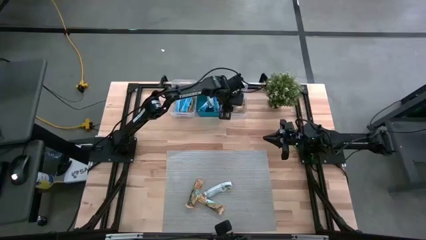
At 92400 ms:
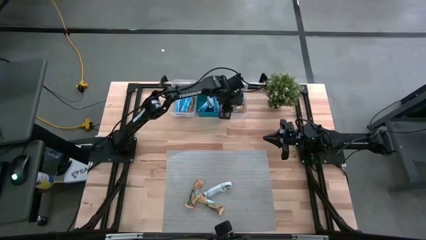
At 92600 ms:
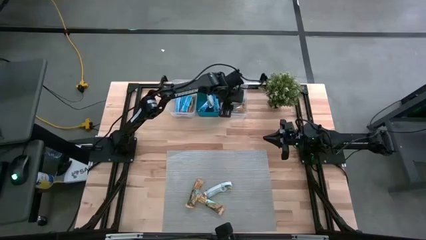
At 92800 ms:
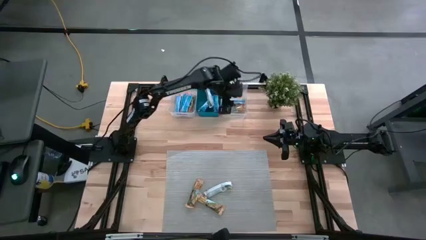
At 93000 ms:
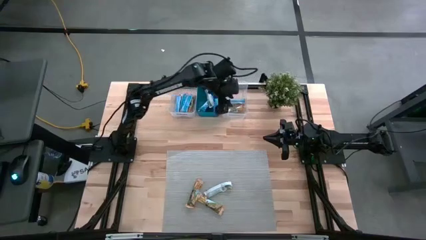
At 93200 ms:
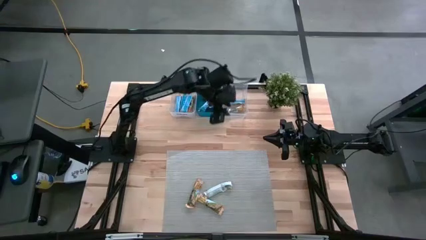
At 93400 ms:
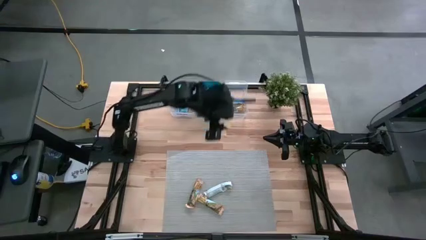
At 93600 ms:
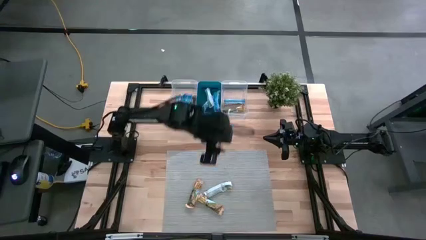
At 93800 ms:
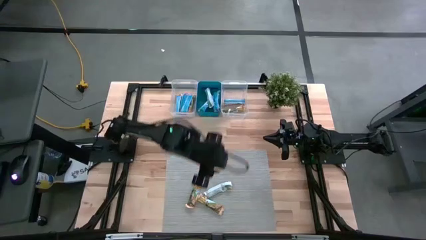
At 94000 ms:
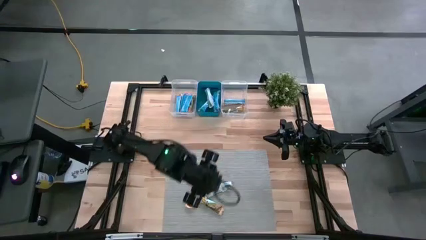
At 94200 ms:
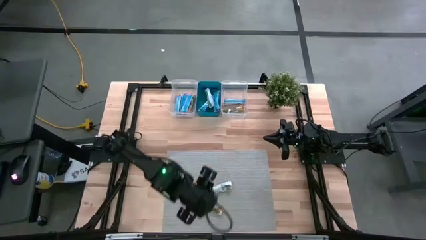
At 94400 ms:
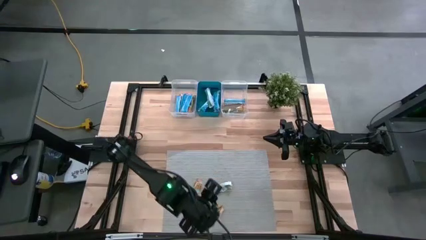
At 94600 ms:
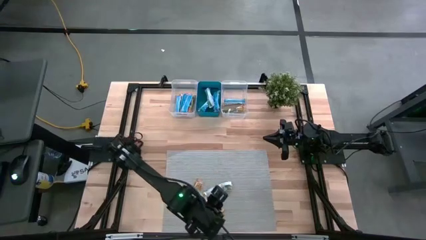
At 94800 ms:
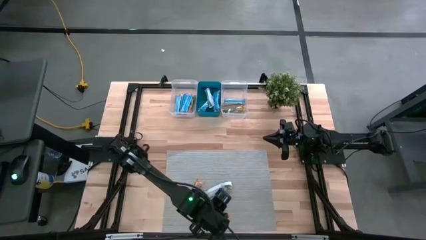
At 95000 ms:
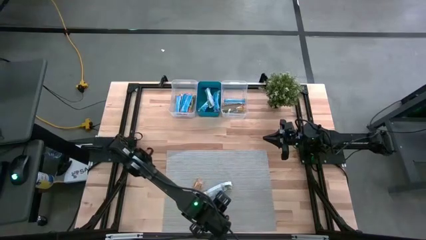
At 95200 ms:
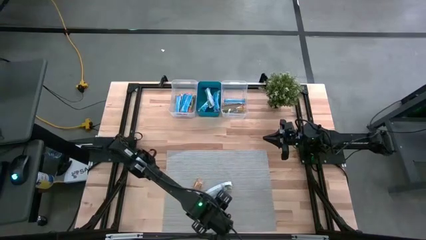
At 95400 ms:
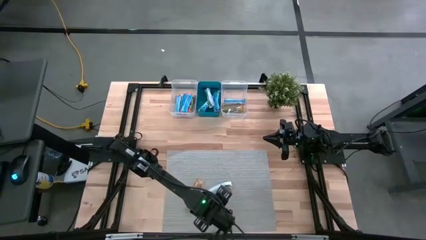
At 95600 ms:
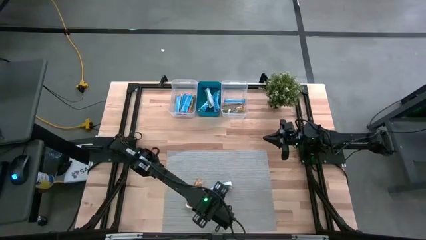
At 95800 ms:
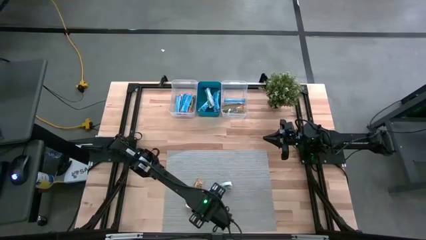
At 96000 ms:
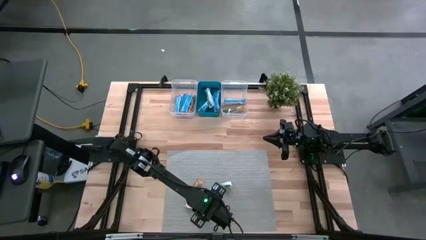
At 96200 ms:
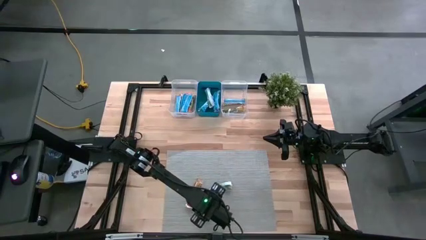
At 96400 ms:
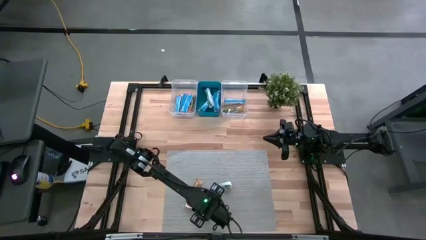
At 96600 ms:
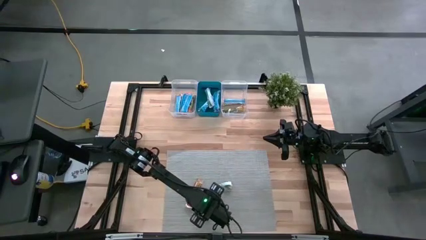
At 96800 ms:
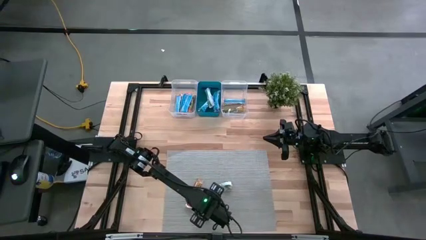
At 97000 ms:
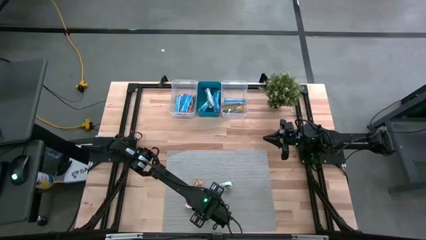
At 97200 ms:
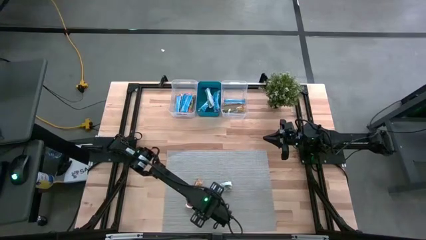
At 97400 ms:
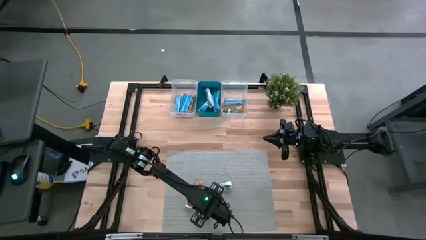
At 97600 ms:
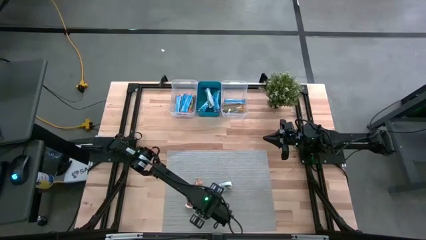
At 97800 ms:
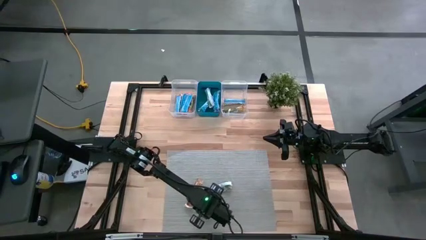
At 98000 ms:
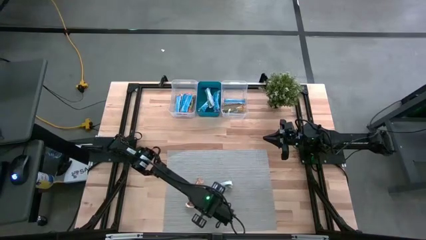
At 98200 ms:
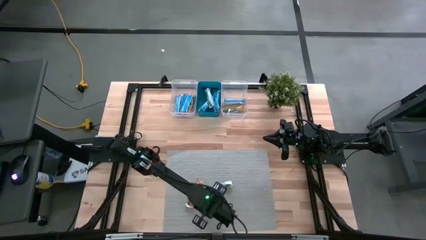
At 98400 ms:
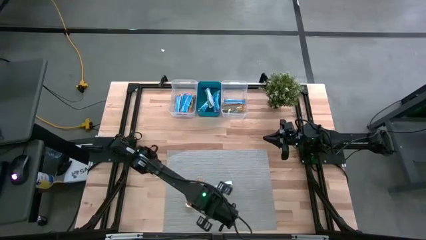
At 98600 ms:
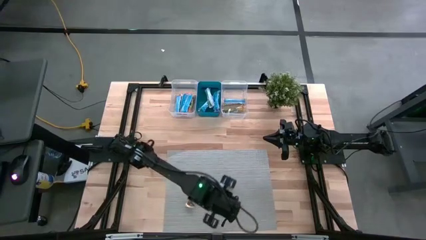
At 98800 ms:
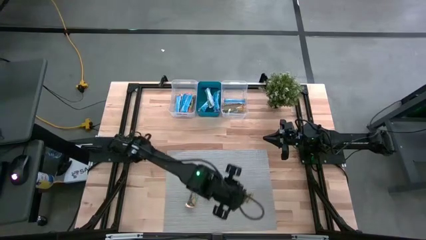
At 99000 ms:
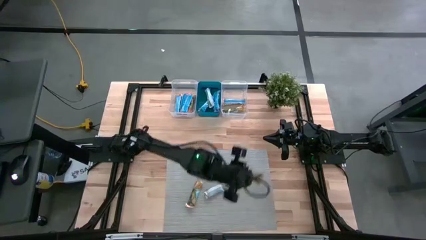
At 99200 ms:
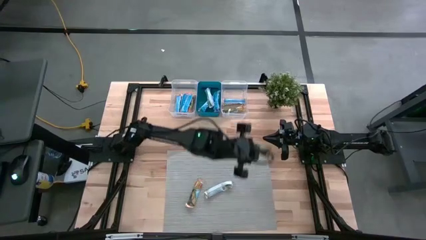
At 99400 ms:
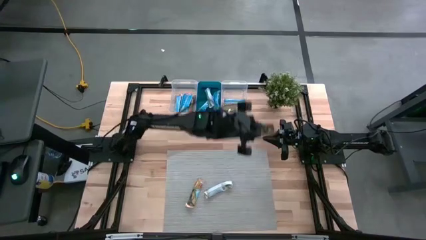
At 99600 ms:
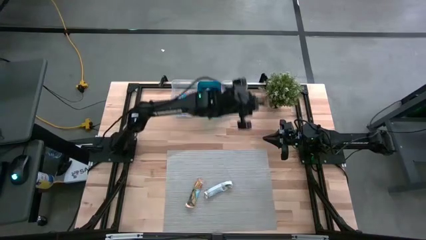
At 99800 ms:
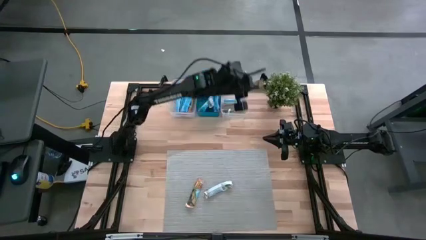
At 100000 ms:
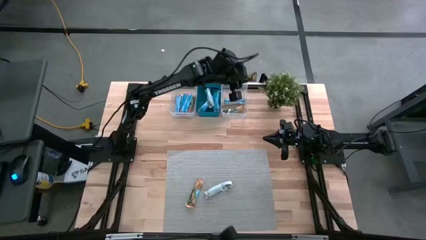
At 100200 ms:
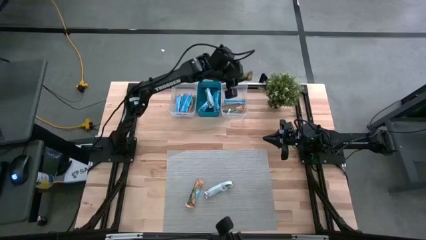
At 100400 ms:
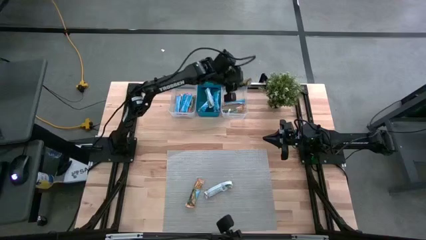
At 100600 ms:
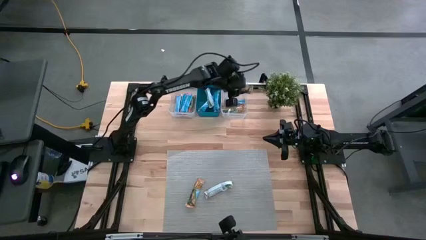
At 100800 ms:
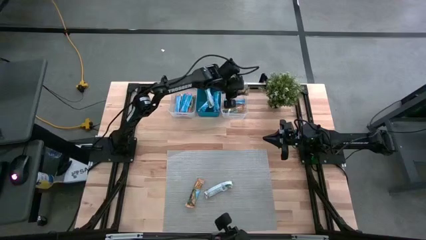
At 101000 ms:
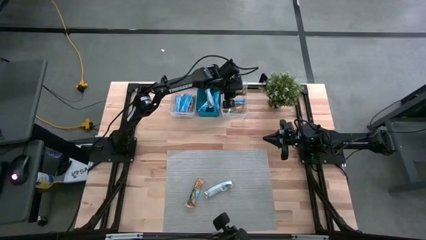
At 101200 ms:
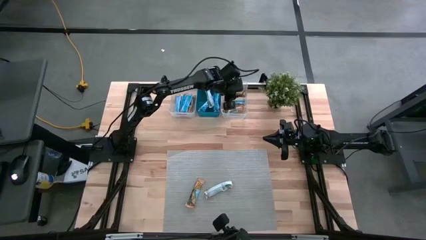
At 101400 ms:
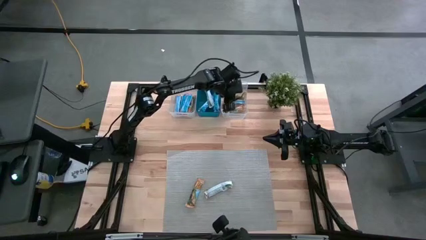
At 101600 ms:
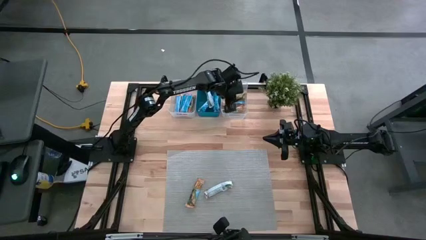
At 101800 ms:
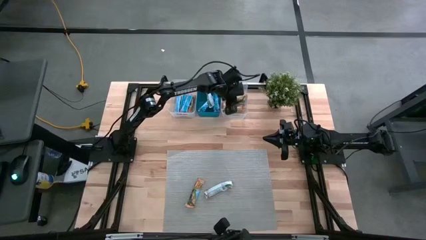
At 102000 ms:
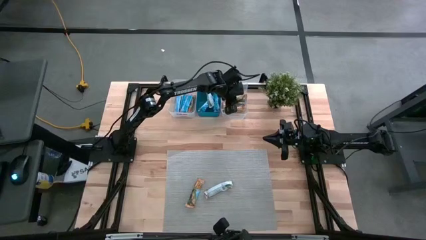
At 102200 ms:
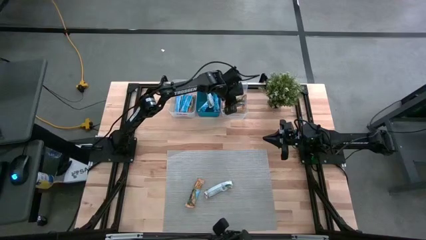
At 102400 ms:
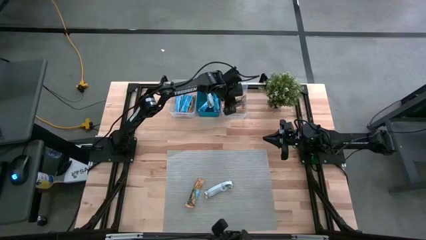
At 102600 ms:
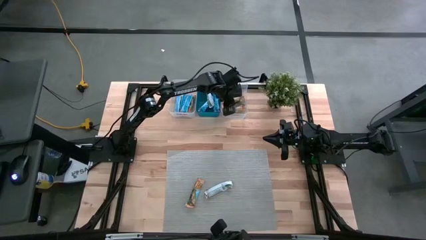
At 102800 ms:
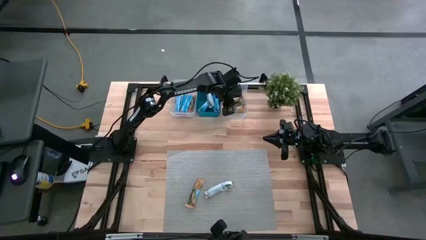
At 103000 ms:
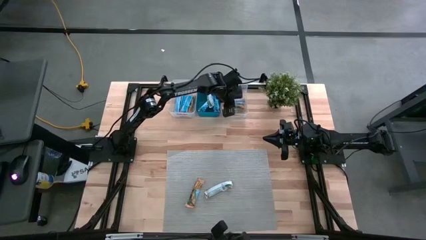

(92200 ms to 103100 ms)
Task: Pick and place Granola Bars by type
Put the yellow granola bar into the right transparent bin
